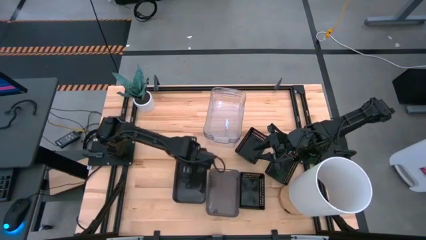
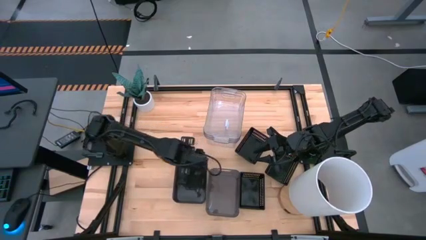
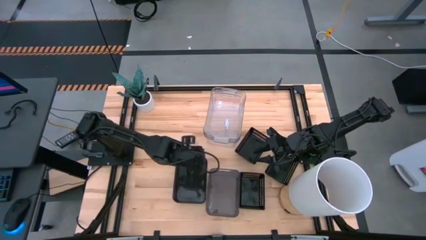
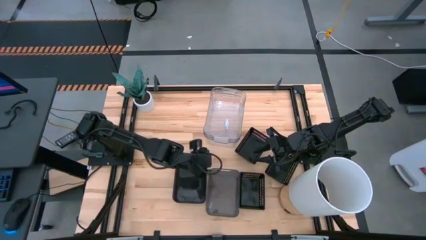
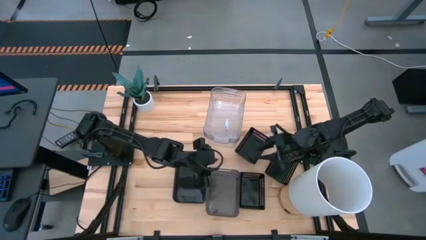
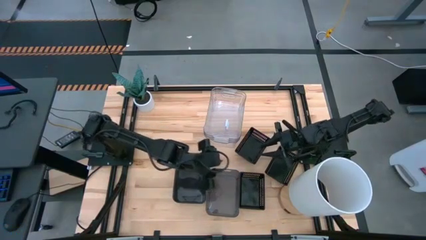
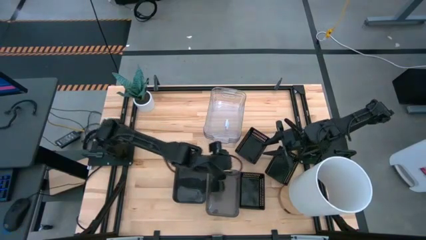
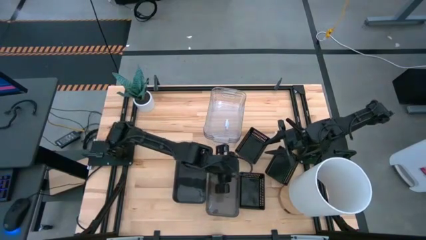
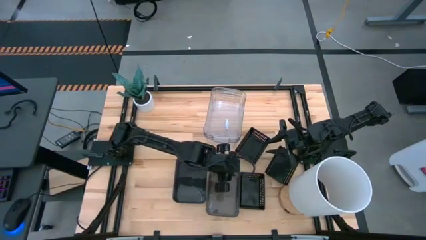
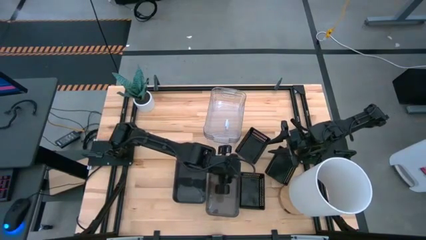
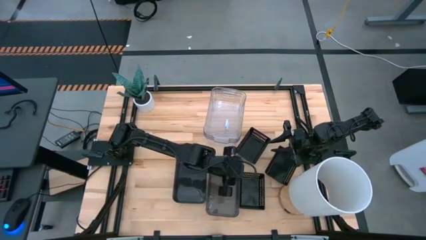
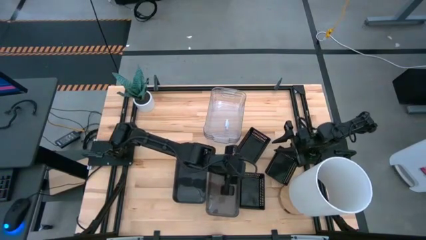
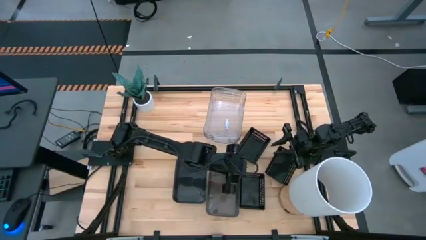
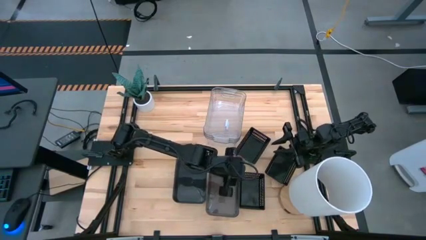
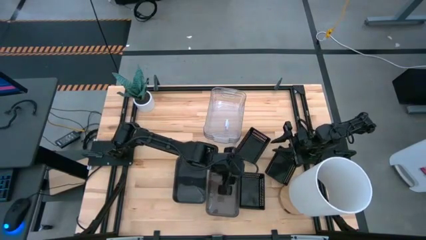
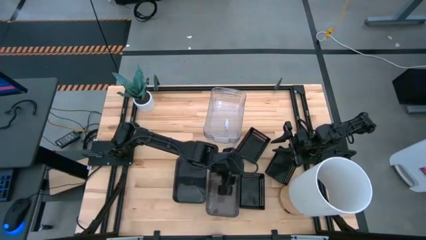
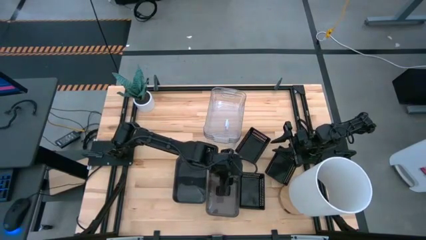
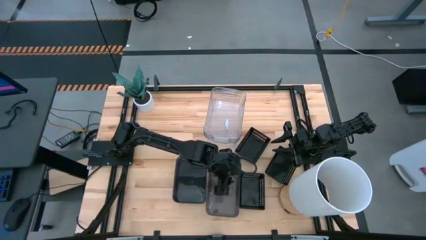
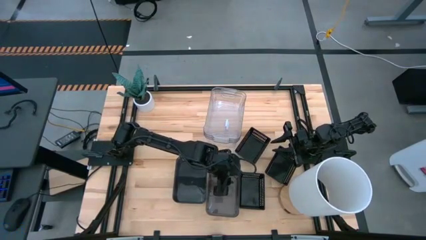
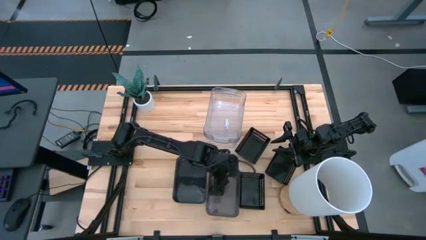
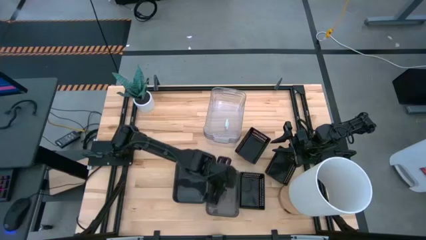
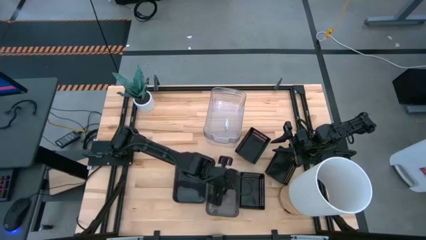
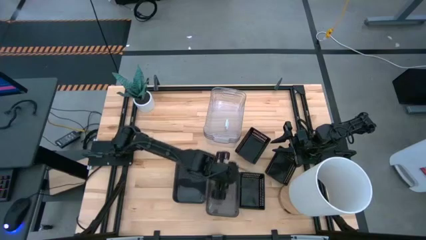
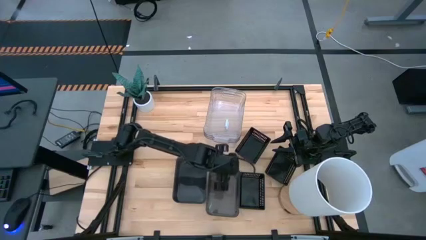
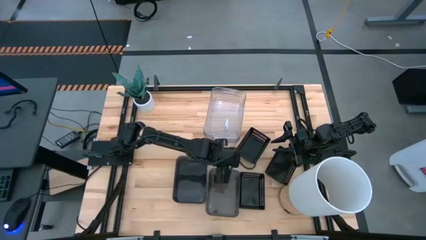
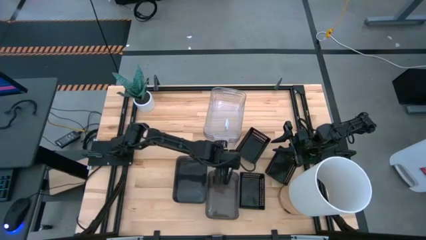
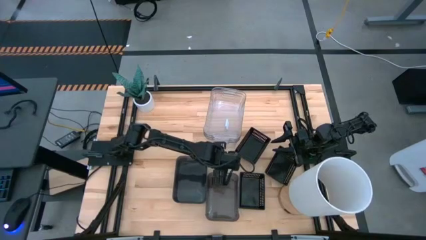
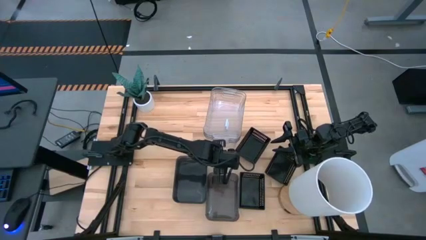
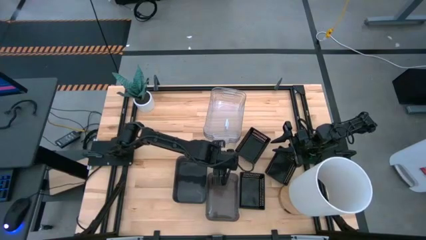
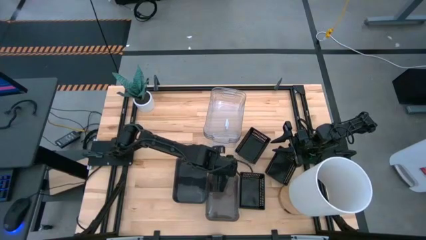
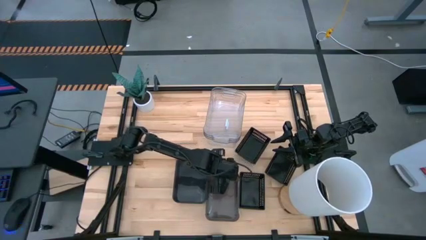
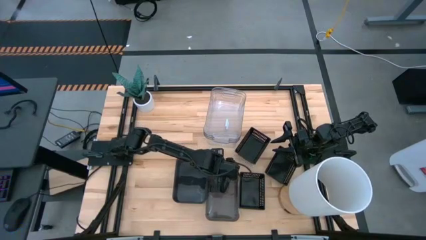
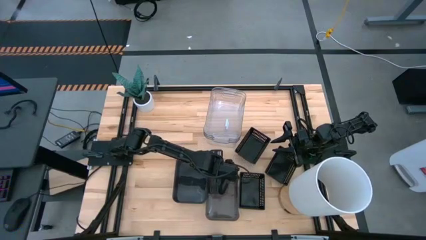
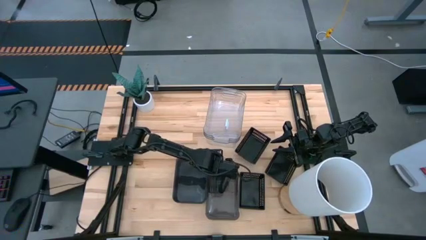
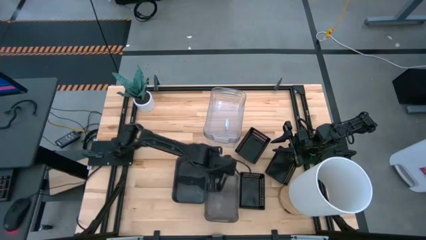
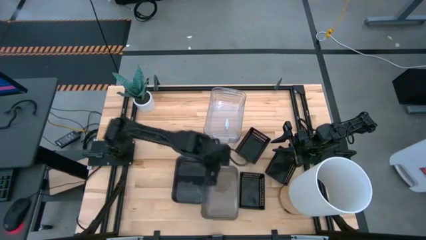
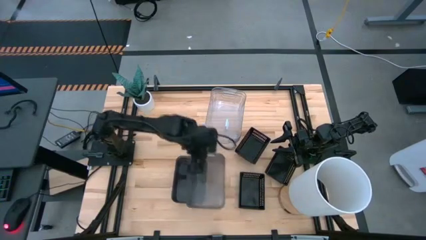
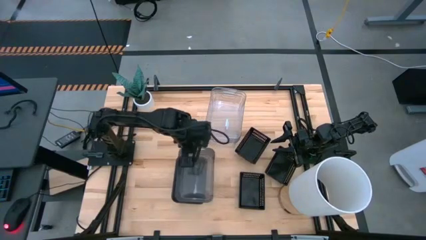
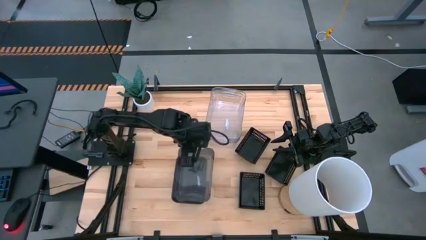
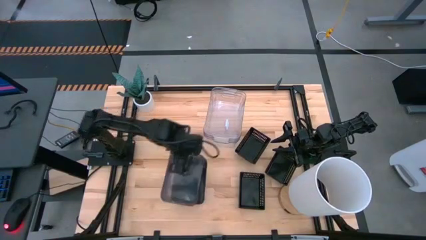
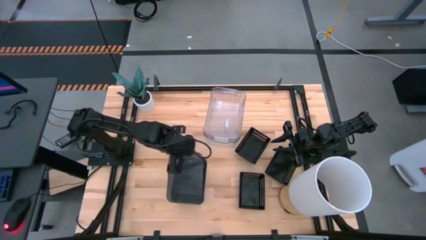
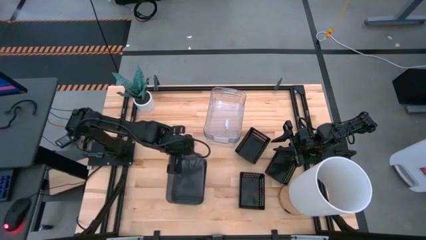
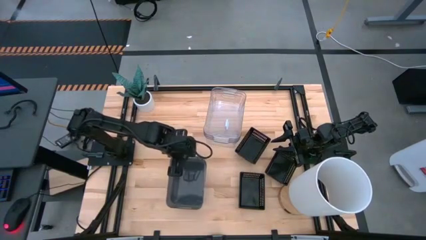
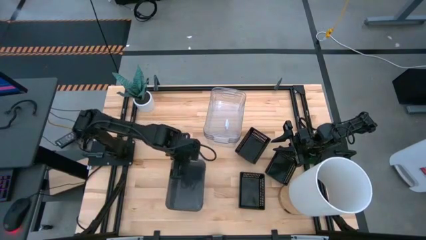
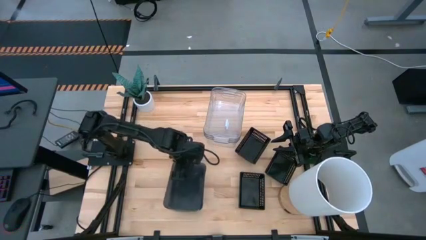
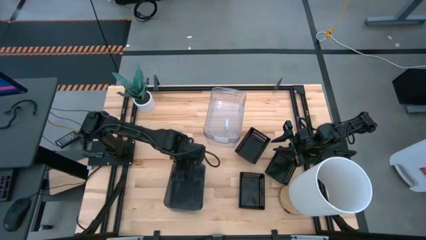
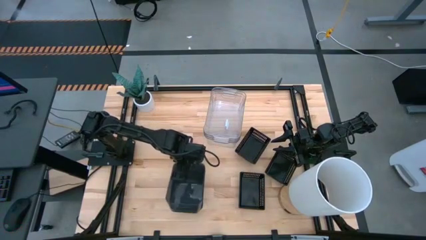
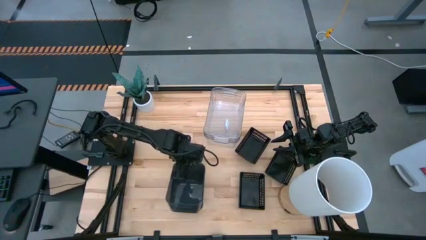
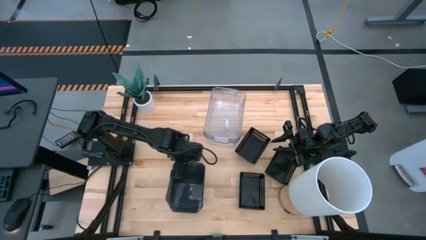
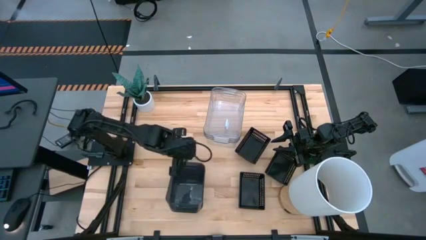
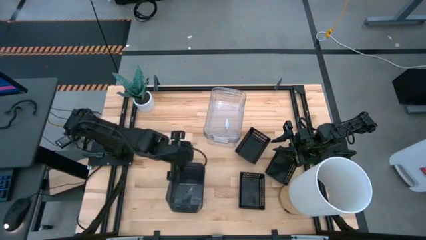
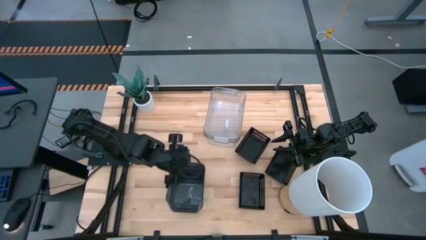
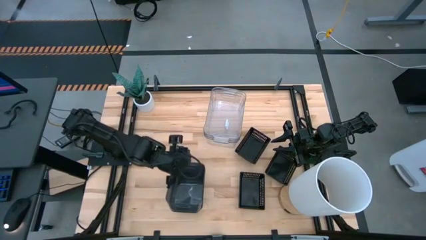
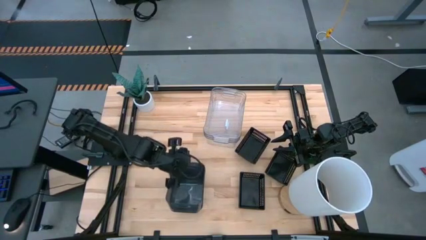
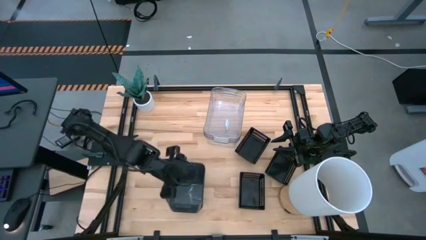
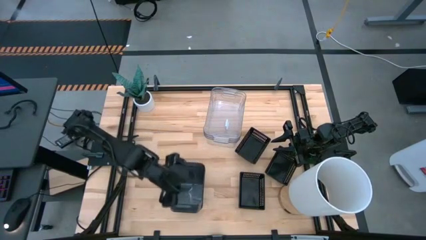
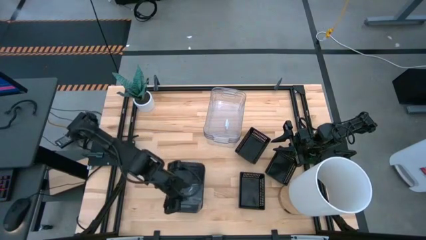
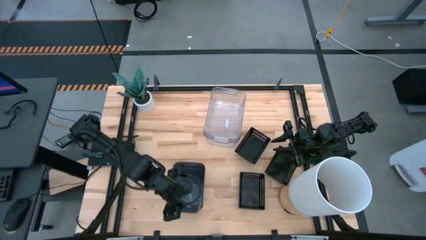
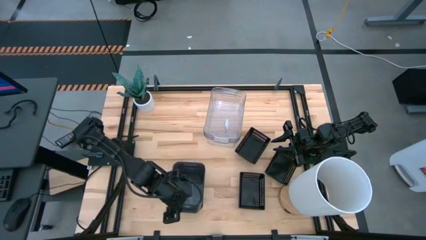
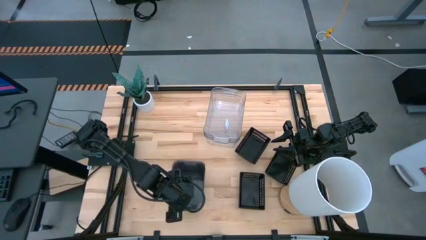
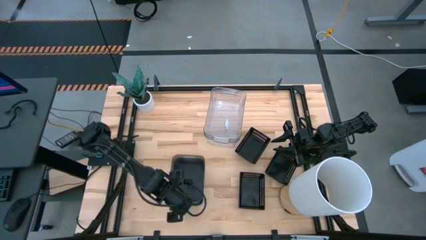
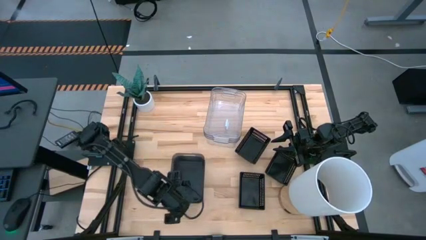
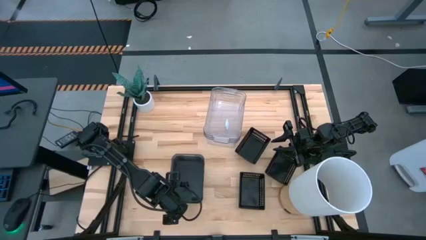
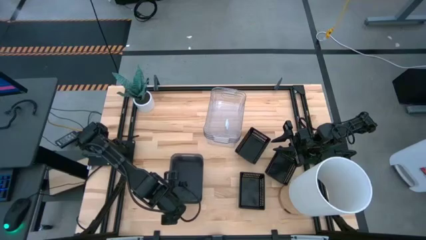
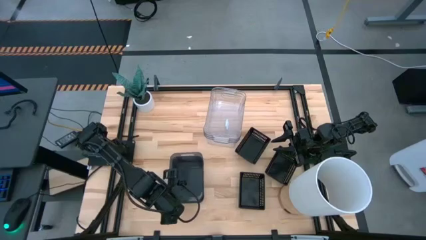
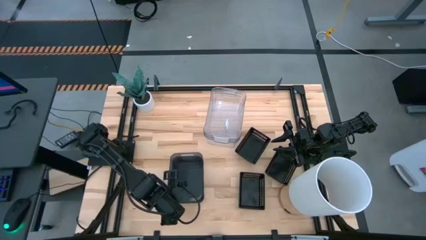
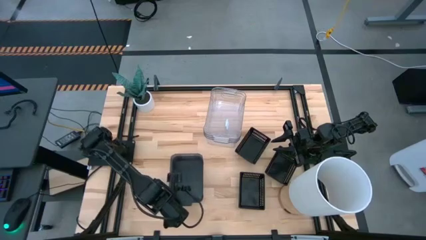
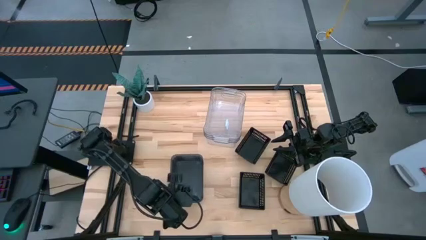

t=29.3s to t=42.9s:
Stack the right transparent black bin on top of the left transparent black bin
